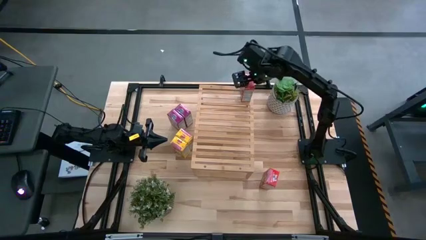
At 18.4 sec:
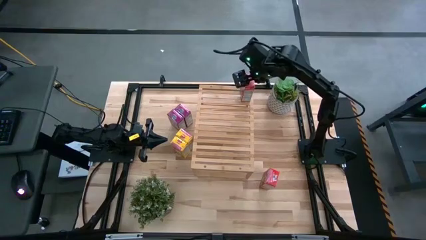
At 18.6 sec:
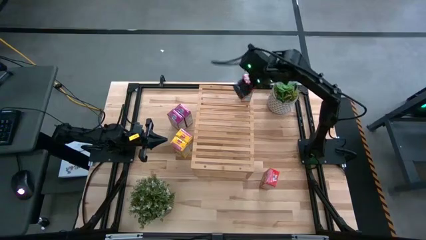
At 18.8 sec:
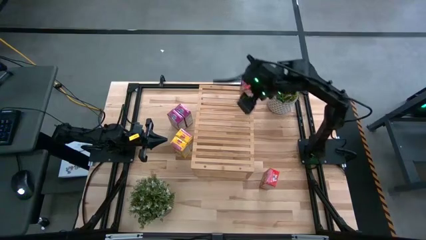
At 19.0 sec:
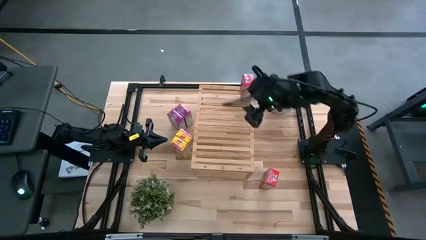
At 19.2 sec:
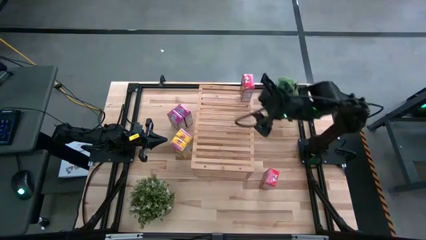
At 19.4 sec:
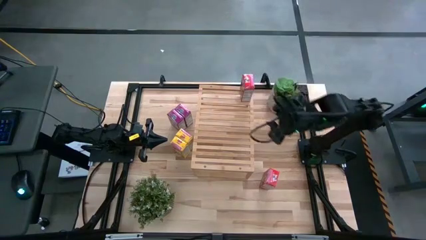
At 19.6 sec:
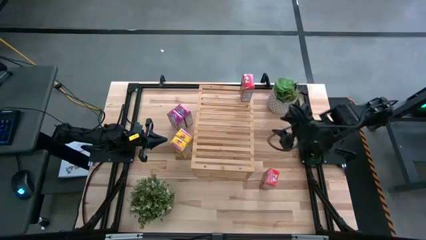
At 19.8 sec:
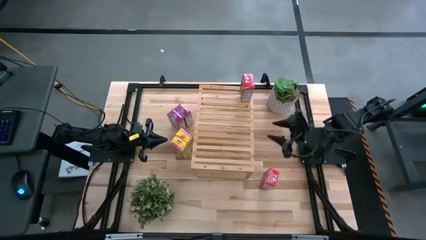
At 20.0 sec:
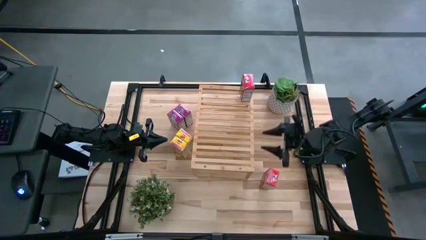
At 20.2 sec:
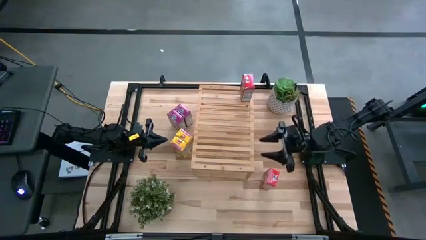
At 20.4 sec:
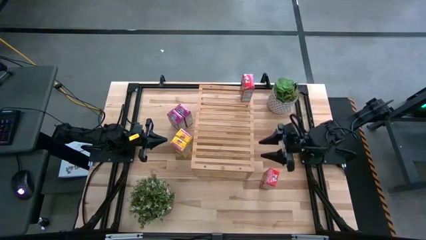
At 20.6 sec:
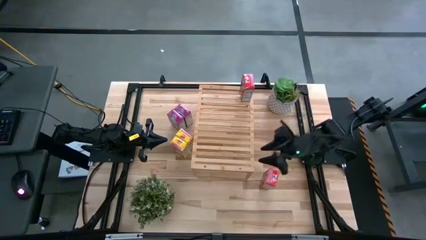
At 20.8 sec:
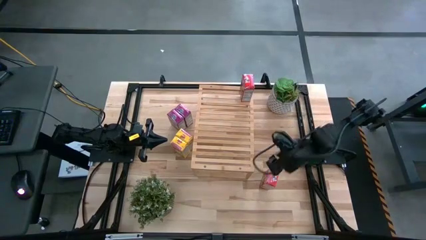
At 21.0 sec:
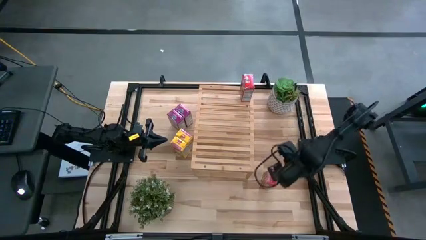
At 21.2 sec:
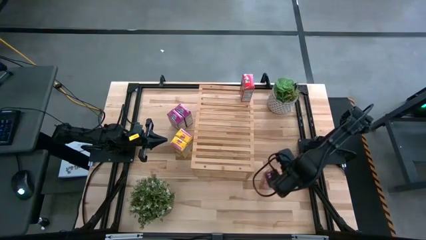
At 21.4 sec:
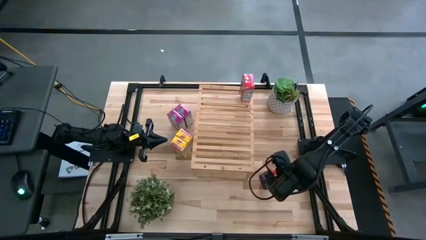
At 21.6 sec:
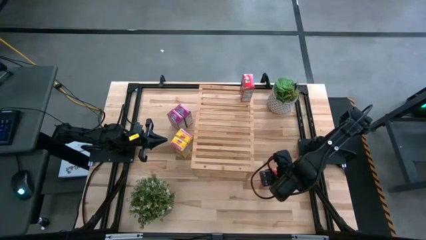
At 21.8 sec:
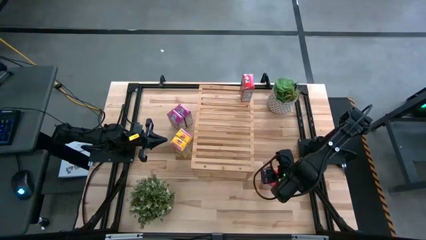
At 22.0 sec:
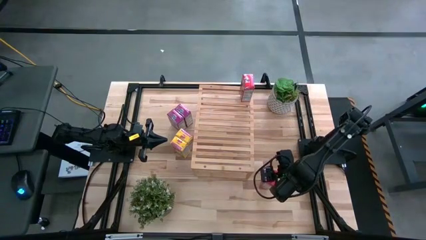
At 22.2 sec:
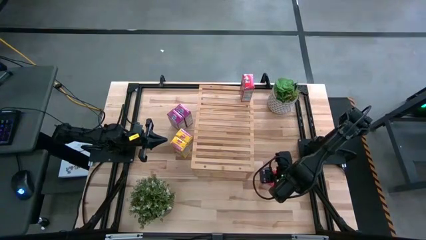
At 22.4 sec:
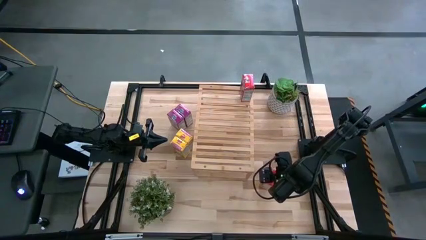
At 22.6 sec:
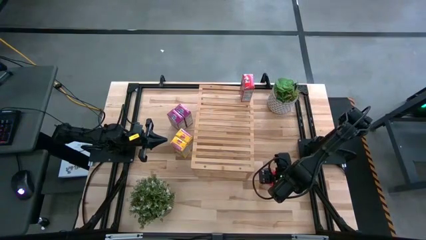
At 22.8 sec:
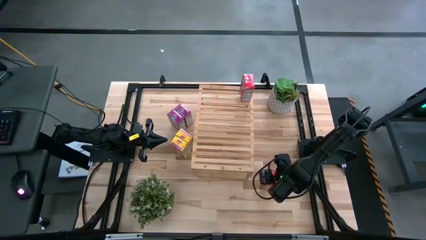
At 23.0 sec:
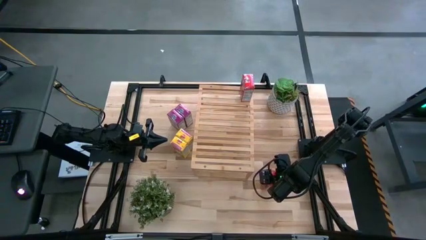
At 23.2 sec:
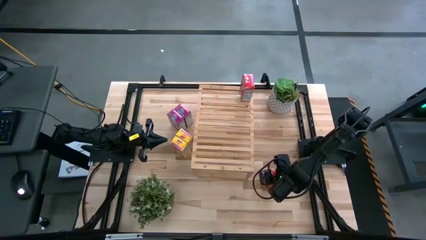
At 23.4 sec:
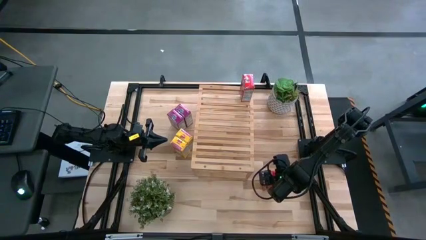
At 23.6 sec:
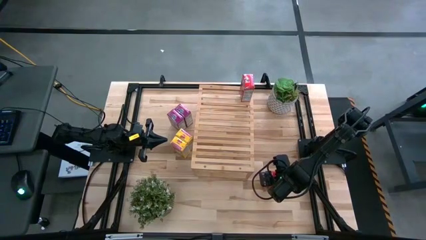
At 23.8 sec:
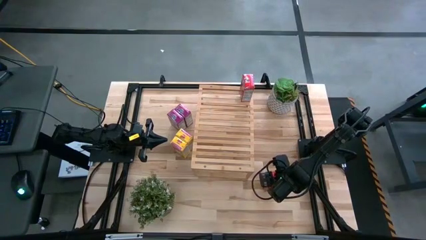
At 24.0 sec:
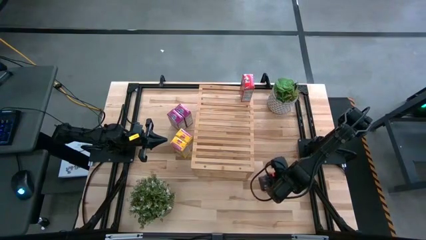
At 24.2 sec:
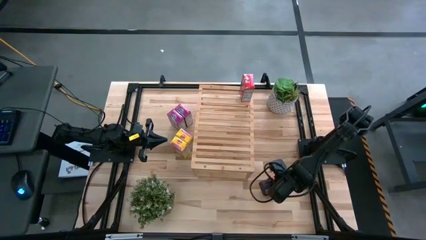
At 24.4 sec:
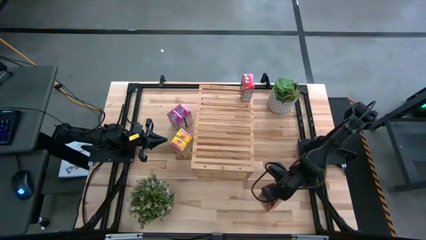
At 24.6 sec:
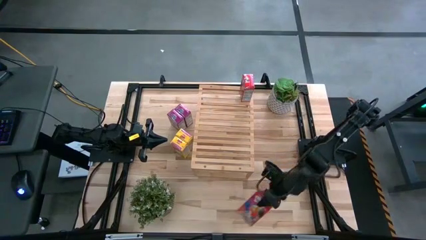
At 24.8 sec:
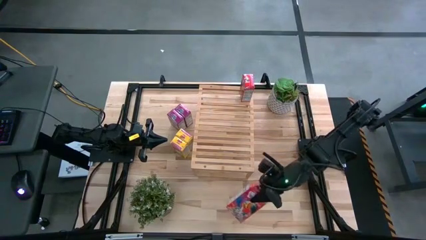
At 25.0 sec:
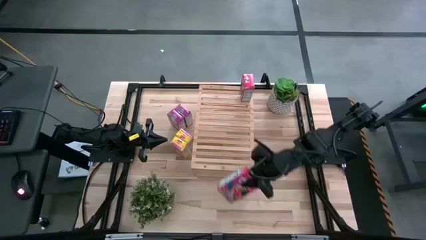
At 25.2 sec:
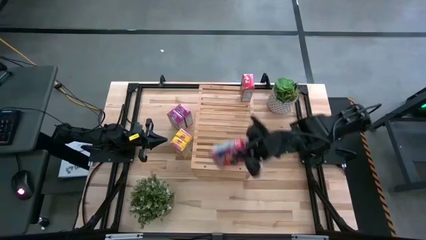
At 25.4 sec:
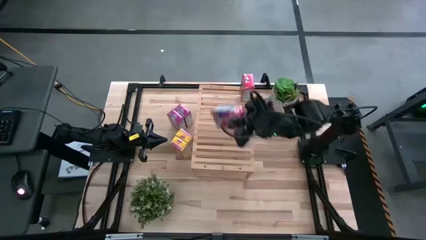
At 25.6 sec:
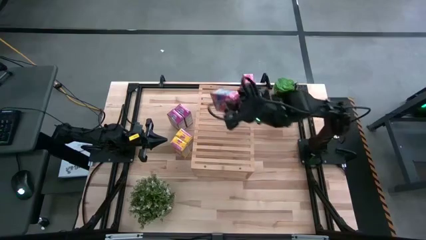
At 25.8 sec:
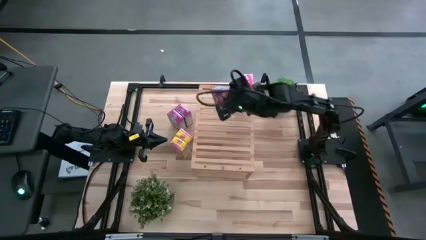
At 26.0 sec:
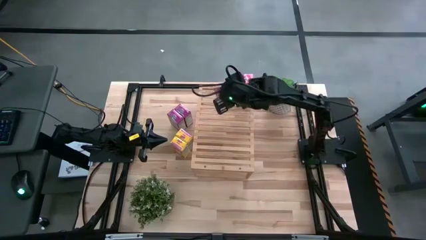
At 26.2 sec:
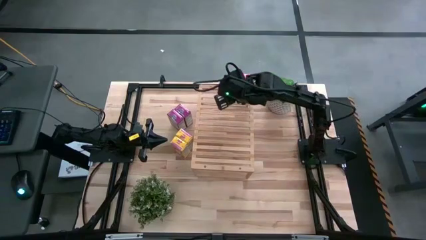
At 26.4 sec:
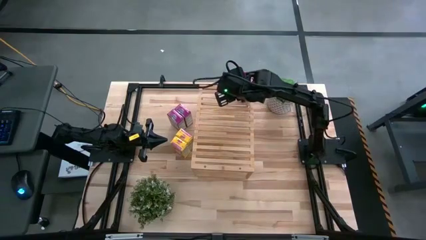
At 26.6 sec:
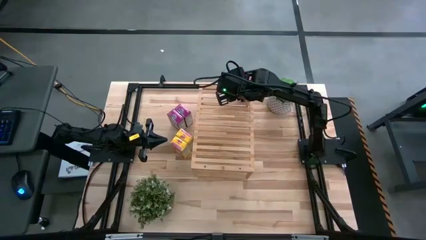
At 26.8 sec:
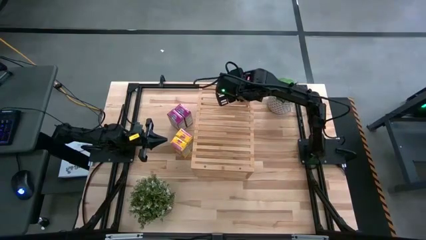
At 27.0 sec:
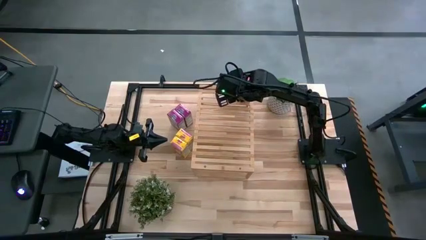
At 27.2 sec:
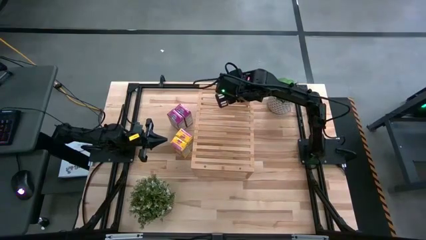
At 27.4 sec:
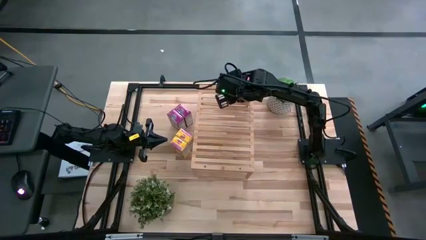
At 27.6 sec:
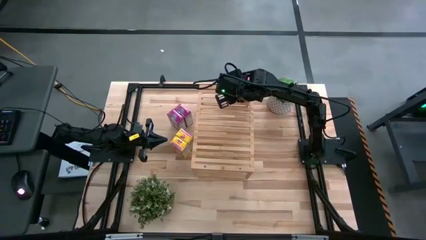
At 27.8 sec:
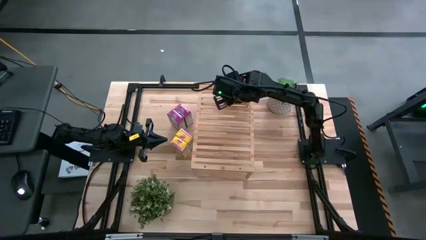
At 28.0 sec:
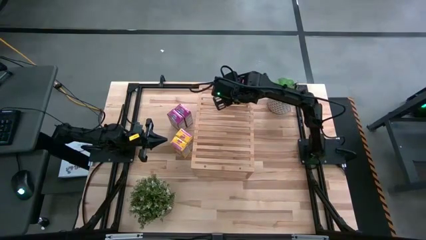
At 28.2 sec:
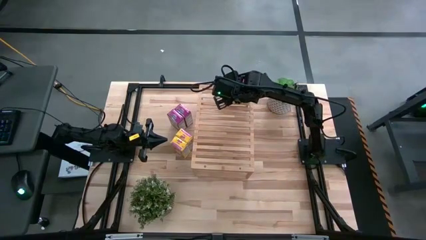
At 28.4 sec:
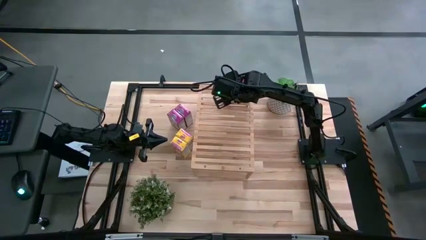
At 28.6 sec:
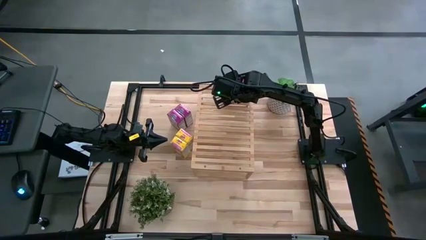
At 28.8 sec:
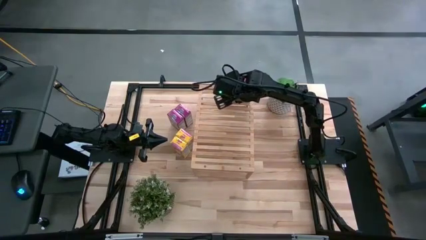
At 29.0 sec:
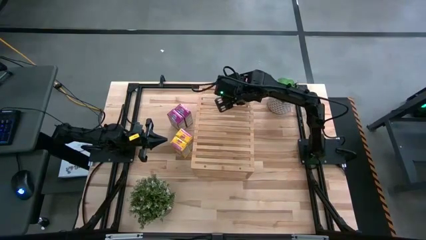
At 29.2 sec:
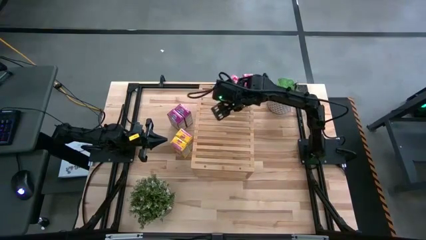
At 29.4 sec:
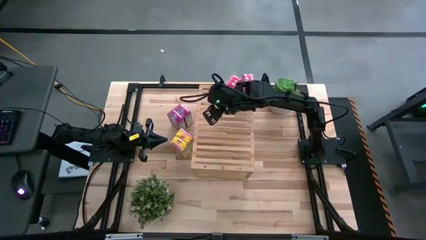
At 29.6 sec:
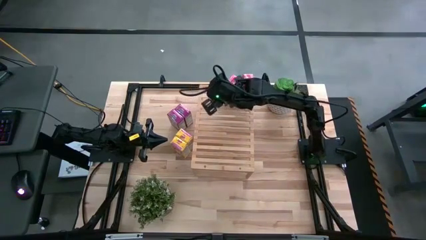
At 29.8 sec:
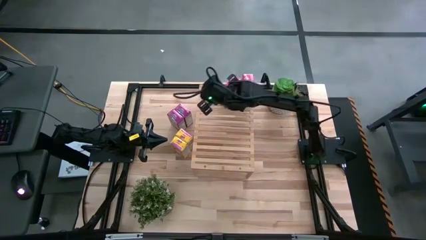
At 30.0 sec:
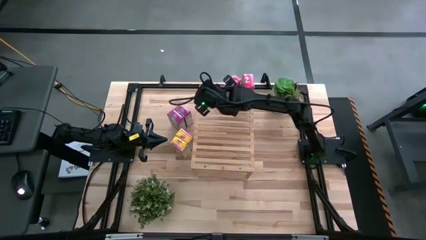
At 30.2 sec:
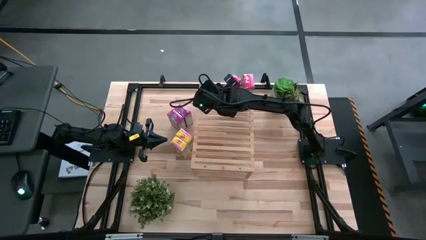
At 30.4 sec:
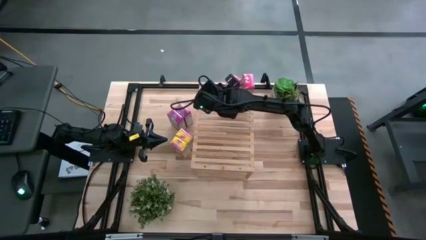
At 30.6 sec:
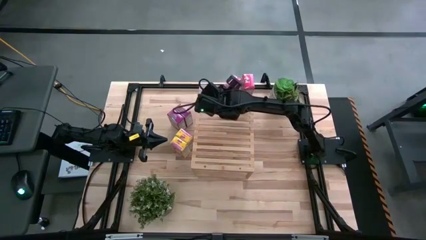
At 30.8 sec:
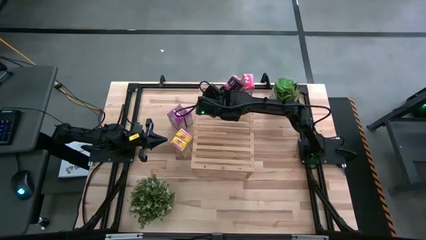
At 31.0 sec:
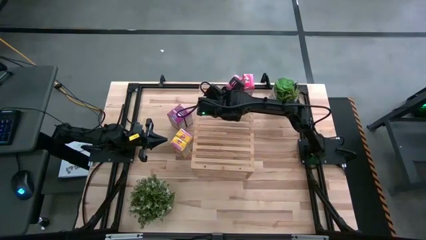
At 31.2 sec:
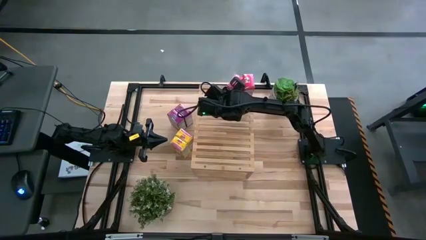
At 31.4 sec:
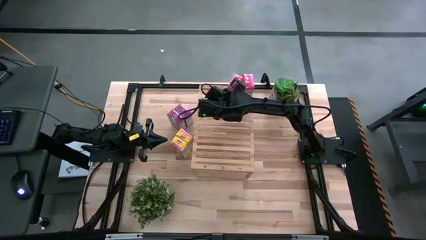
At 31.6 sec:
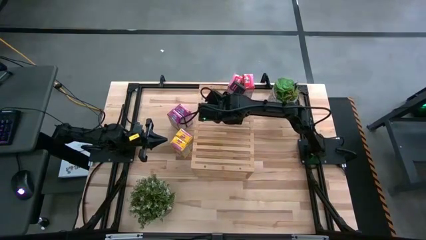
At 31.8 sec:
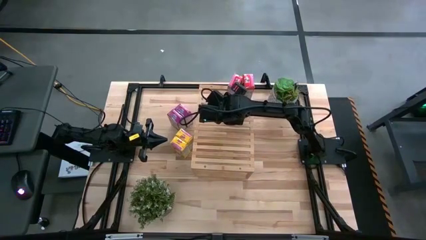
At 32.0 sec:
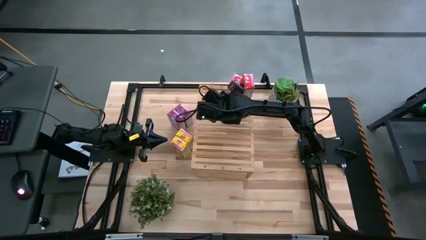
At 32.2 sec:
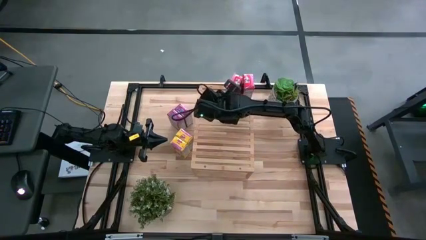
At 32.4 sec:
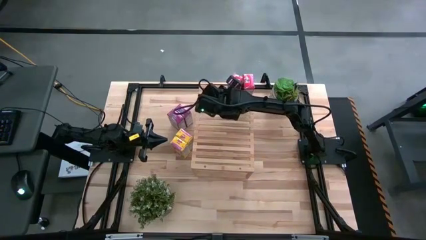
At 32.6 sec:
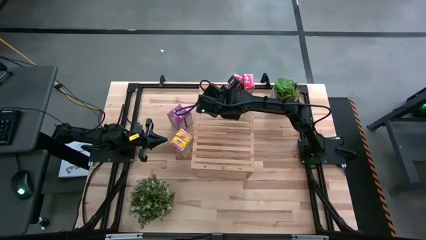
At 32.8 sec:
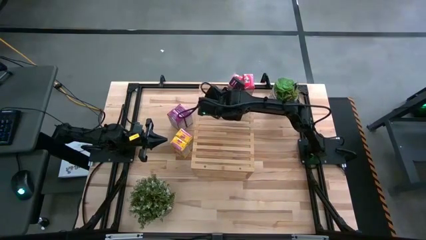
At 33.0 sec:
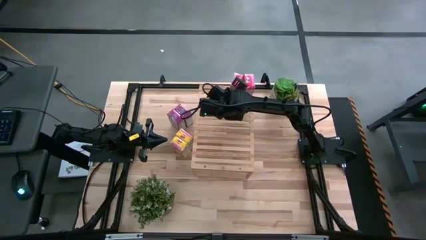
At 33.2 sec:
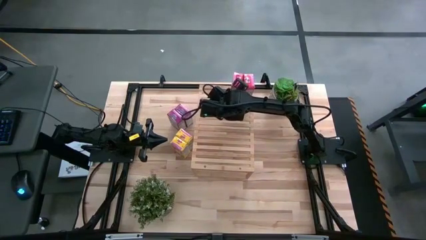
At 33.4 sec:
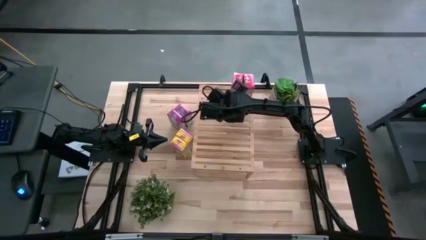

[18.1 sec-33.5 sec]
Task: Stack cereal on shelf
Put the red cereal box on the shelf aligned with the other red cereal box

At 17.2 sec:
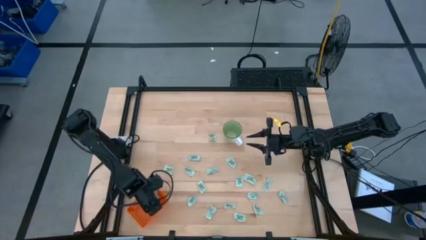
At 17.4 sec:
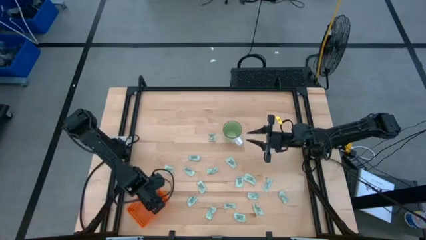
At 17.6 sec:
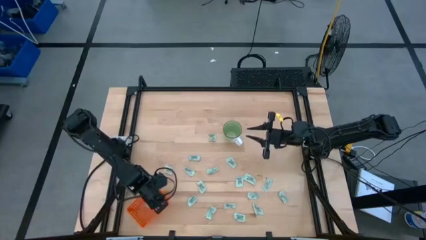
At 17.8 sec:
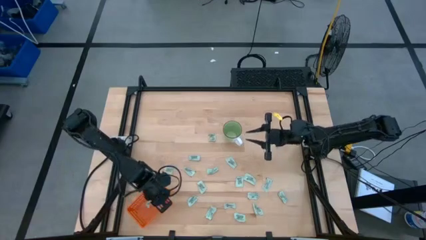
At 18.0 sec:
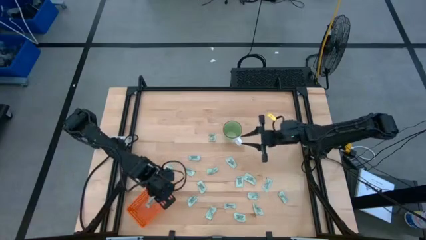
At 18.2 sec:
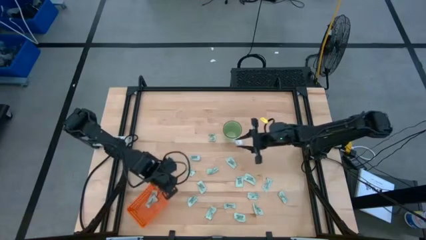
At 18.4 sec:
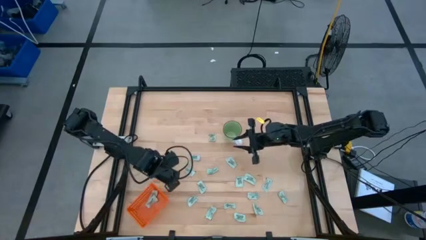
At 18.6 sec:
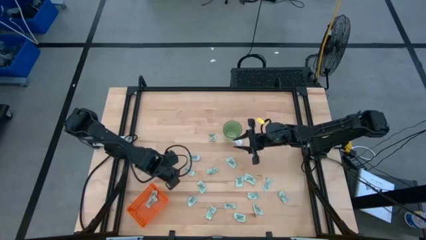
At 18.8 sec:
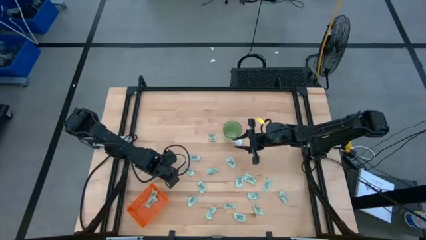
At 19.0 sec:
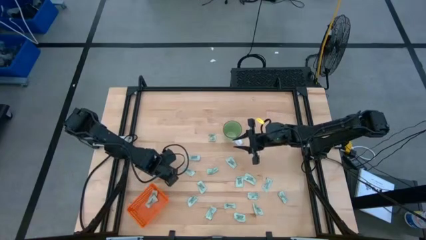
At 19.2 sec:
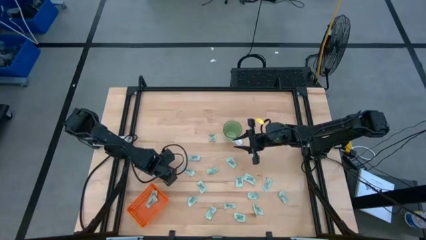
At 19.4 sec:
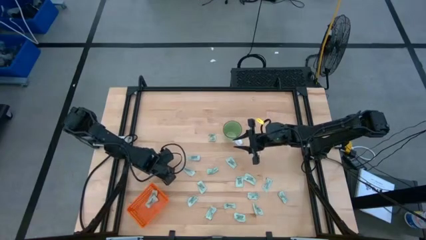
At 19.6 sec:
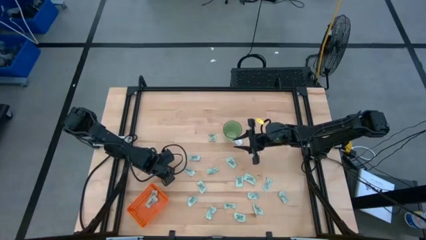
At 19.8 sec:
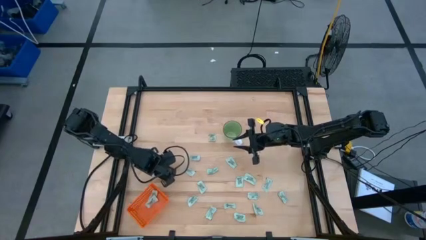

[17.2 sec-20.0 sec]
Task: Pick and place Stevia / Truvia into bins
Put the light green stevia packet into the orange basket
